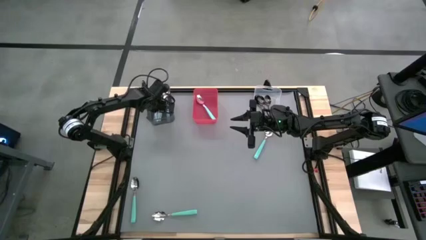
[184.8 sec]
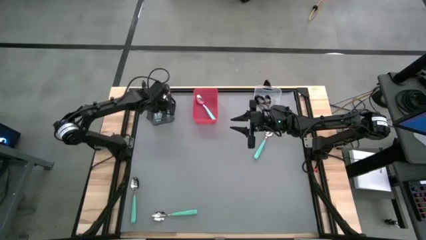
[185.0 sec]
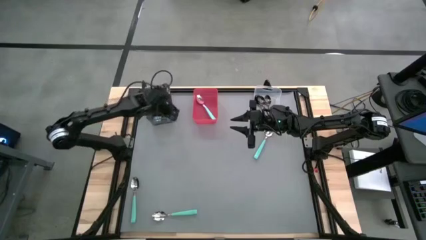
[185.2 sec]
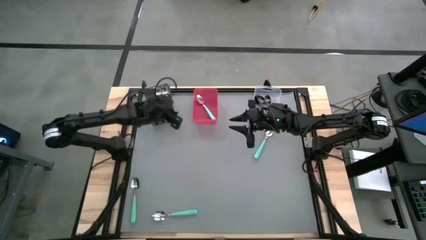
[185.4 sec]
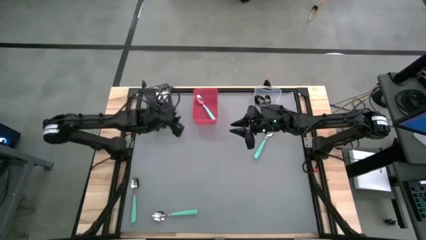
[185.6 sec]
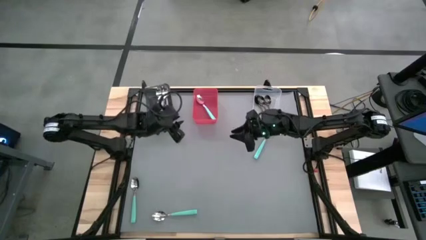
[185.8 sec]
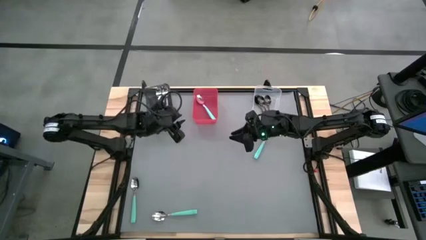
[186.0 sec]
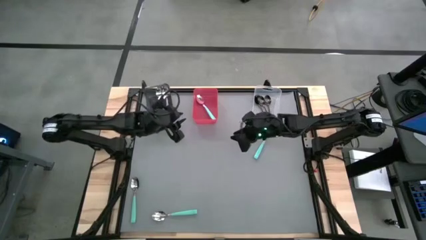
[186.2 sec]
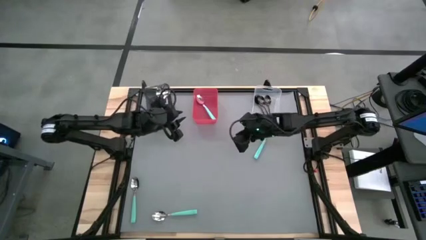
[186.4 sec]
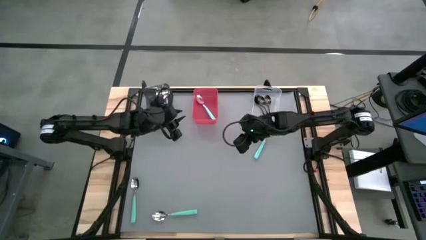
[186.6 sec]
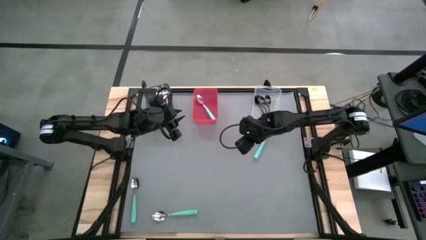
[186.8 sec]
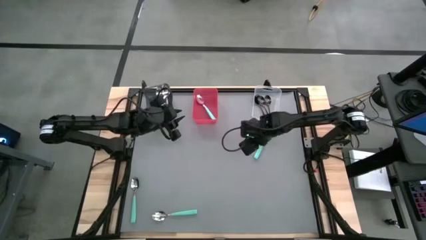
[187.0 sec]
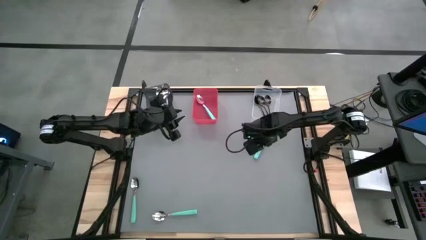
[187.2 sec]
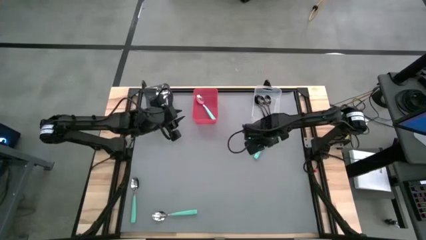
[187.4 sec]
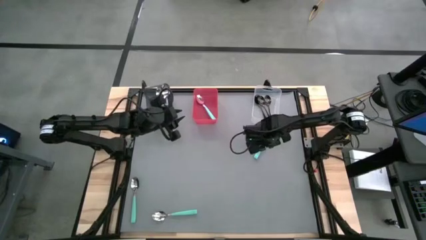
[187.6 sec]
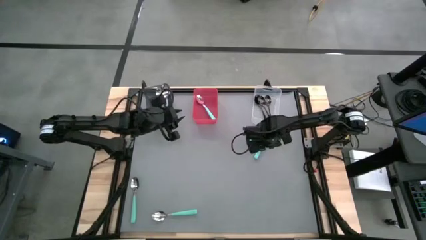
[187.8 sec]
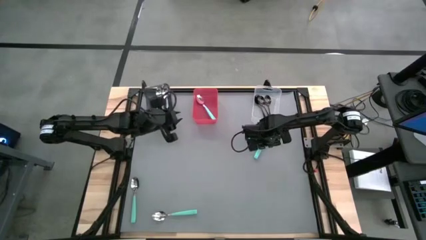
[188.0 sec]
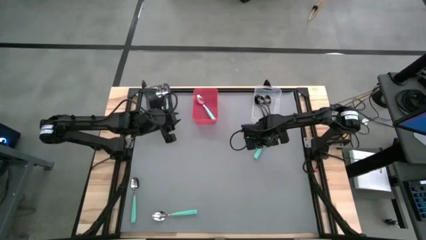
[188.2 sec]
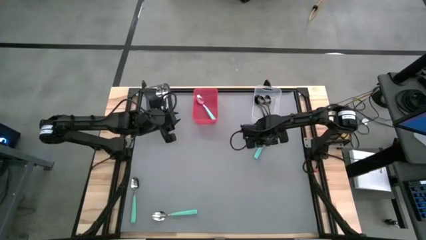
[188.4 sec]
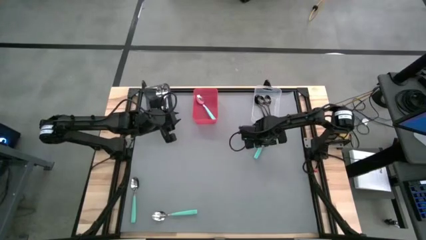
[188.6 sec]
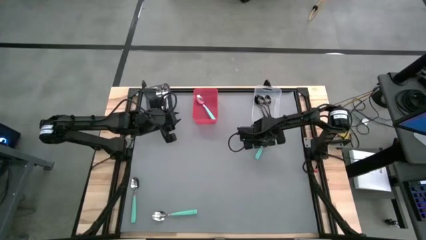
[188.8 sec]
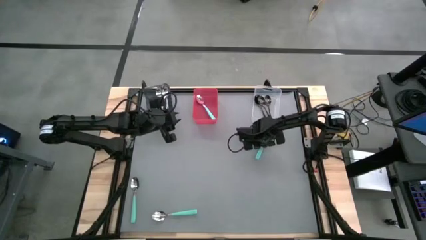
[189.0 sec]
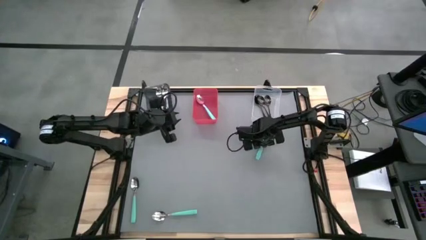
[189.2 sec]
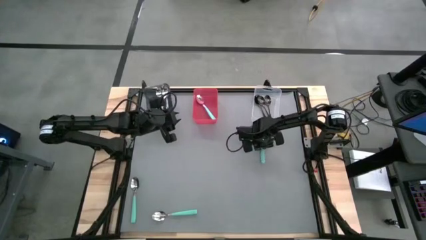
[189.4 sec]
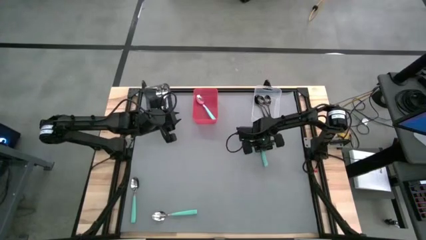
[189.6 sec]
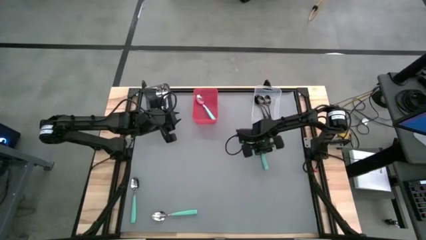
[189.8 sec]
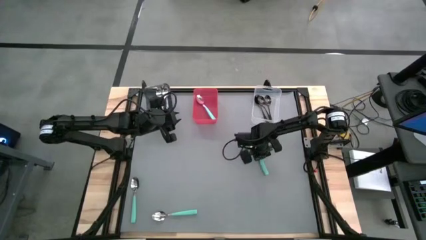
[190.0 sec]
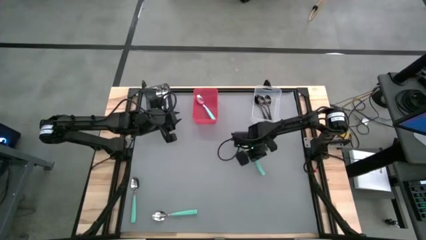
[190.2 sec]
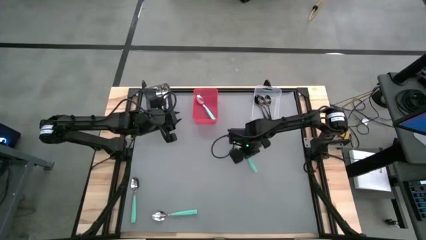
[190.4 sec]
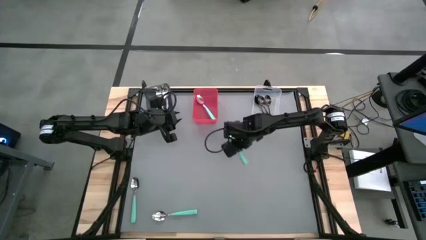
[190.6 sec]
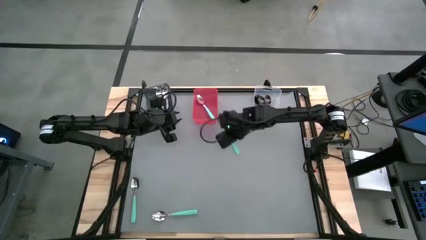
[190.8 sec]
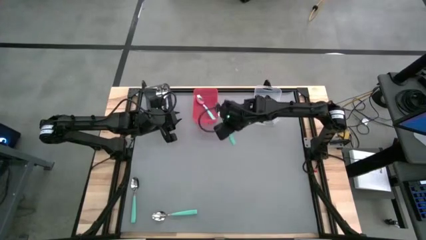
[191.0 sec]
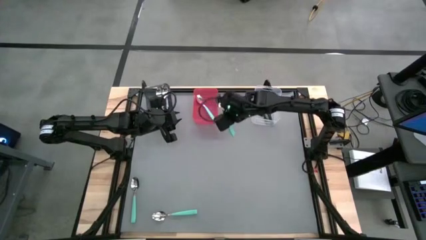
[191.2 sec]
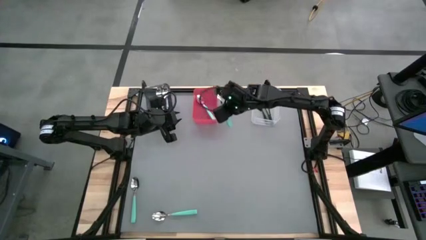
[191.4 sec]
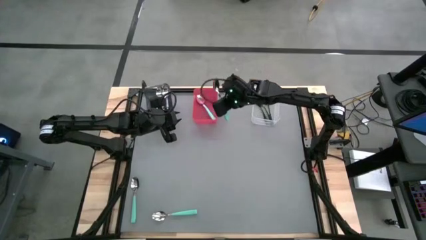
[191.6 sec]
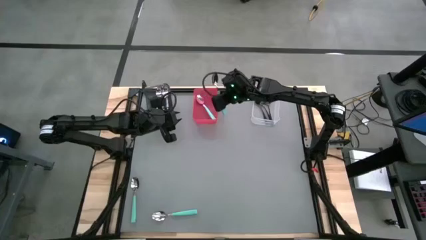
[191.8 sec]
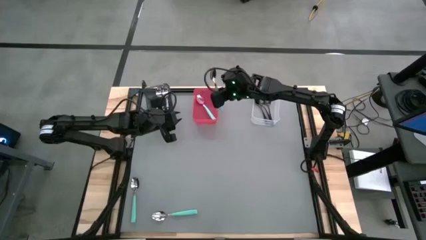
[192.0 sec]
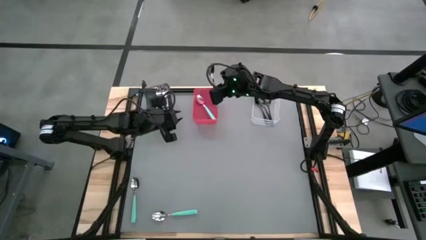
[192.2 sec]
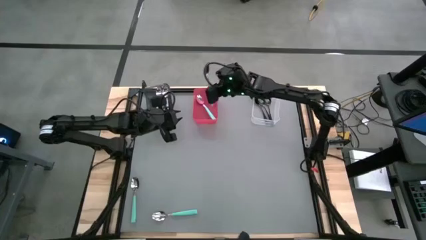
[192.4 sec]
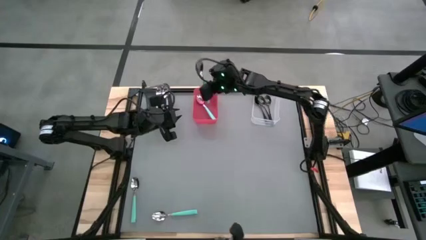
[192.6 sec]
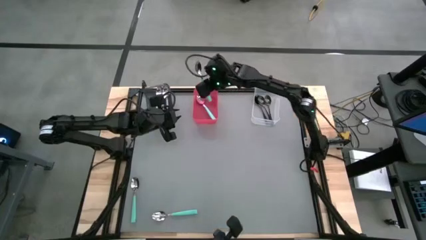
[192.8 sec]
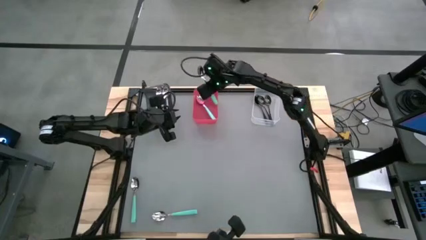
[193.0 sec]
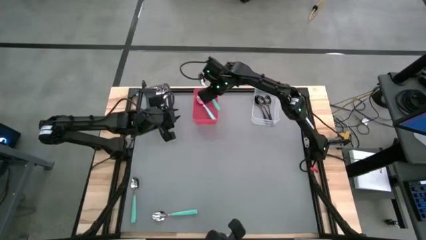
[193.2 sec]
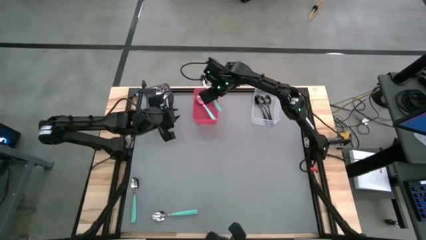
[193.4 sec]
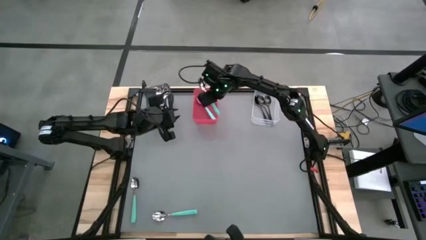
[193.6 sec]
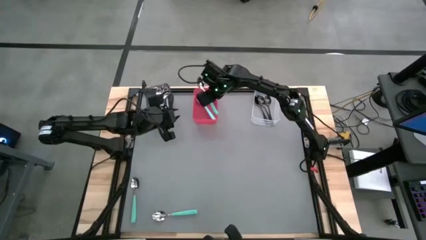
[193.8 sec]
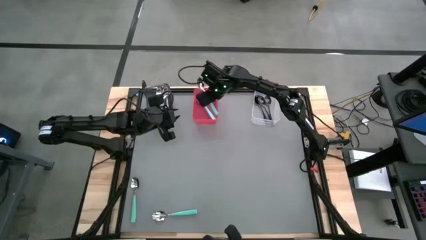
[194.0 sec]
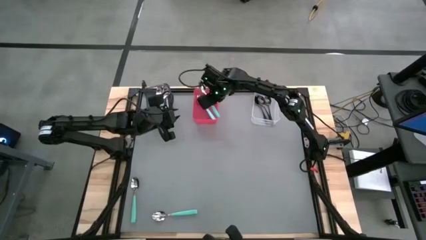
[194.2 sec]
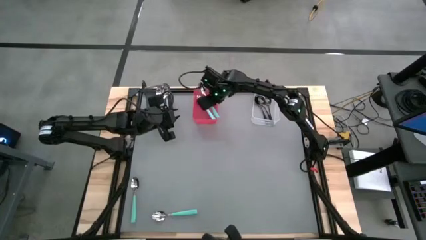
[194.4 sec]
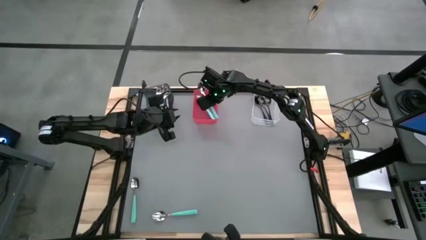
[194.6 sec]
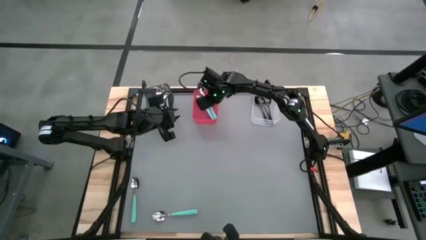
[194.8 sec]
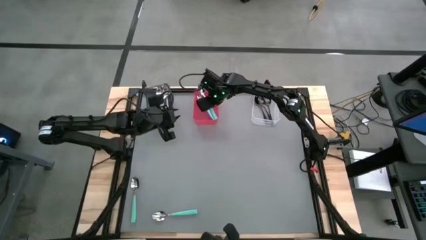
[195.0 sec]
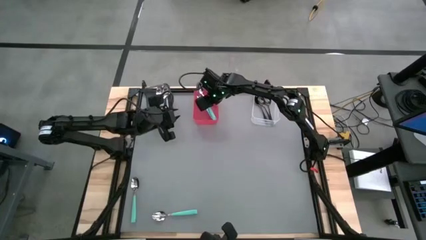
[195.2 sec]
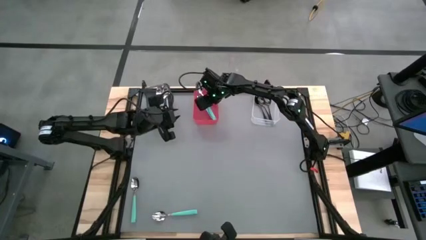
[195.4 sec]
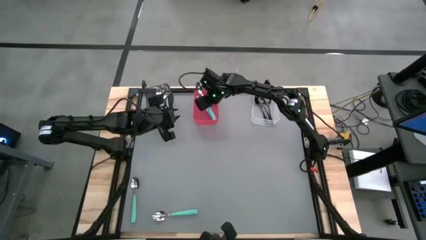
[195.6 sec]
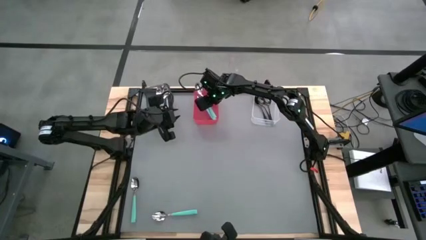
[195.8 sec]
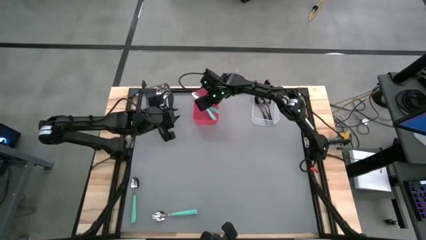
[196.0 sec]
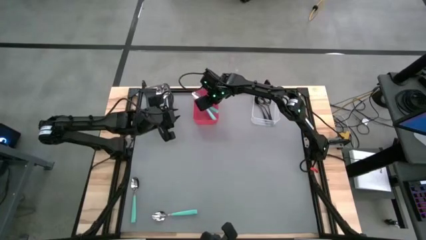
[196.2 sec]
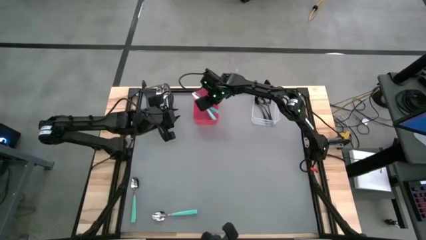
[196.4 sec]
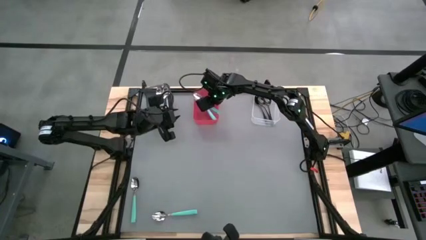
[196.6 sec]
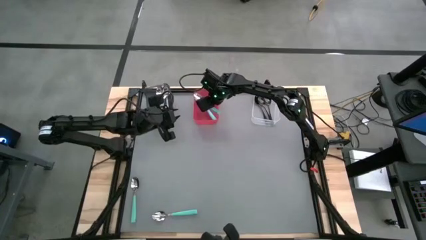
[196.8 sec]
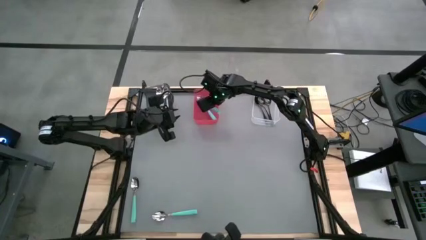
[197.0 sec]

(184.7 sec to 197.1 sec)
Task: Sort silverware by color (type)
Put the blue spoon into the red bin

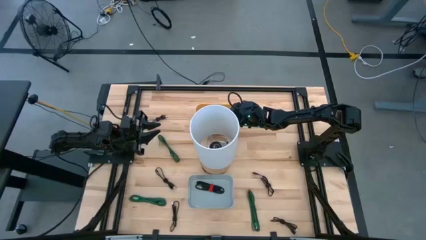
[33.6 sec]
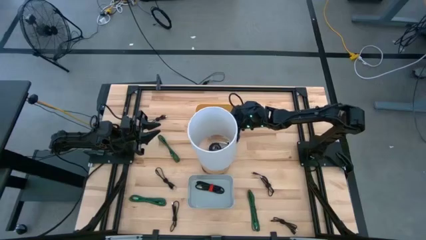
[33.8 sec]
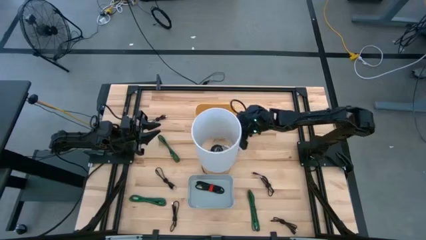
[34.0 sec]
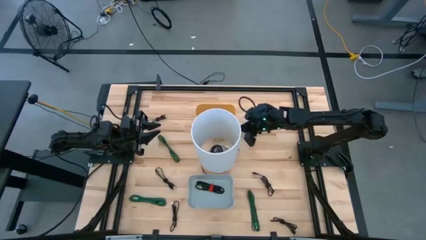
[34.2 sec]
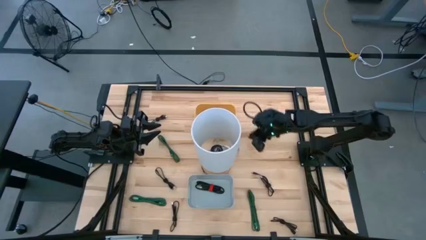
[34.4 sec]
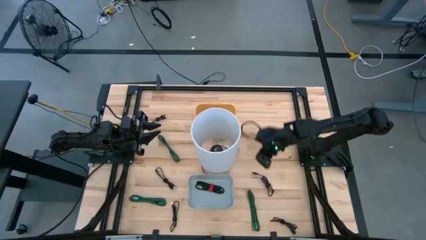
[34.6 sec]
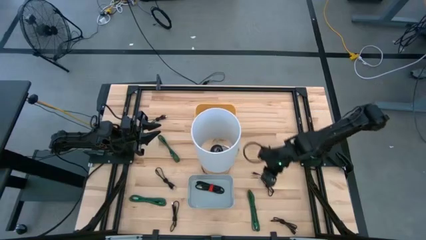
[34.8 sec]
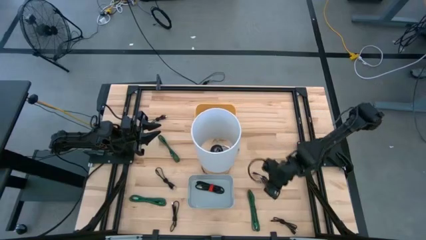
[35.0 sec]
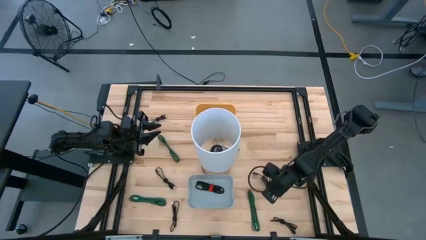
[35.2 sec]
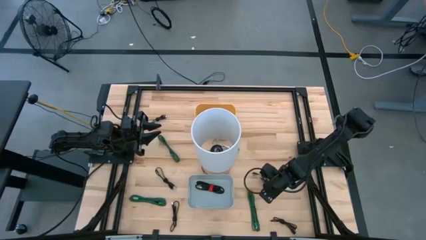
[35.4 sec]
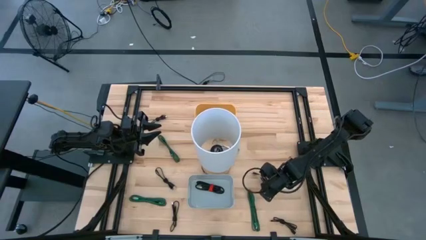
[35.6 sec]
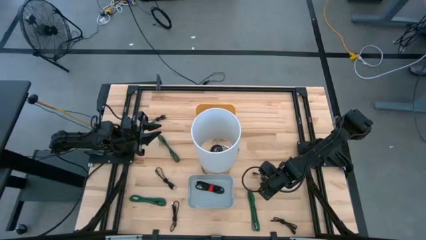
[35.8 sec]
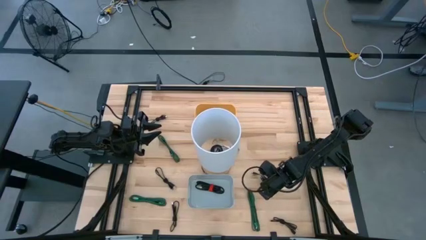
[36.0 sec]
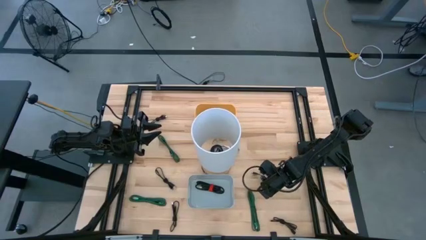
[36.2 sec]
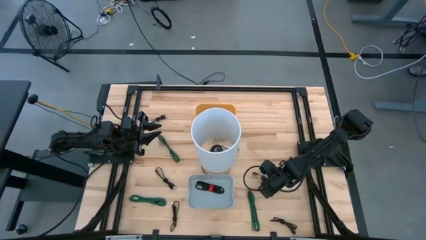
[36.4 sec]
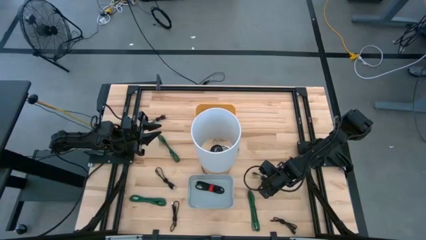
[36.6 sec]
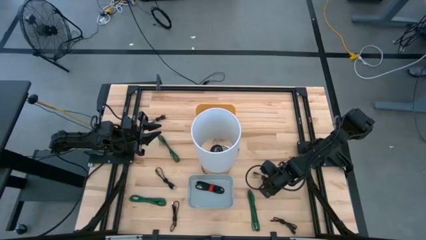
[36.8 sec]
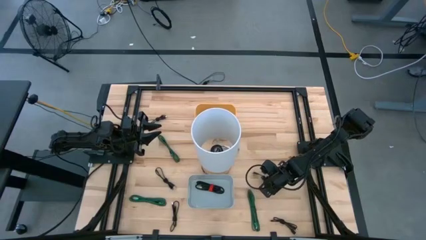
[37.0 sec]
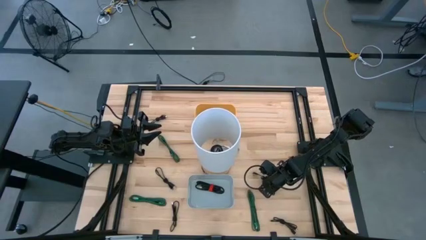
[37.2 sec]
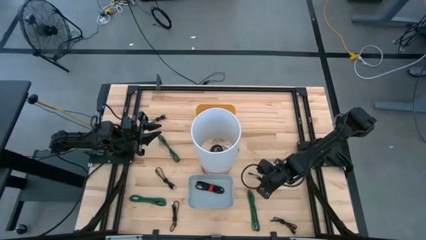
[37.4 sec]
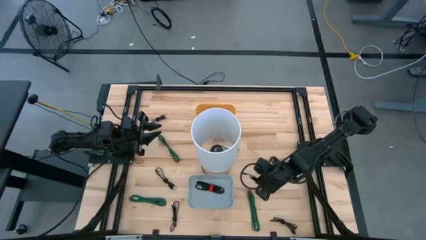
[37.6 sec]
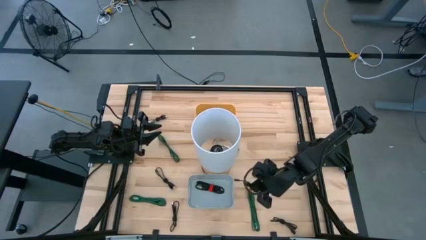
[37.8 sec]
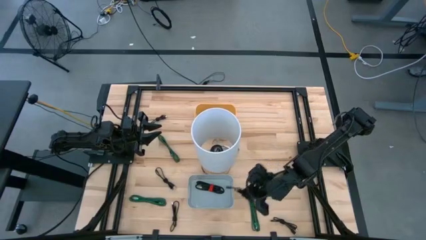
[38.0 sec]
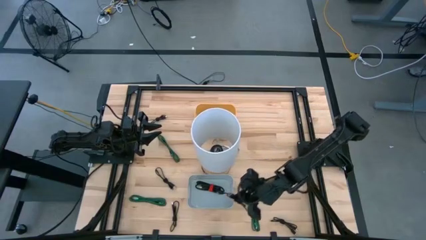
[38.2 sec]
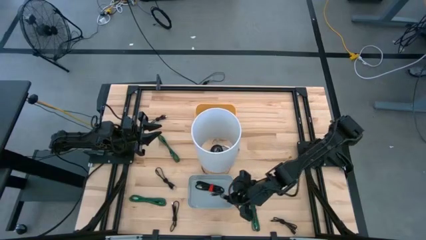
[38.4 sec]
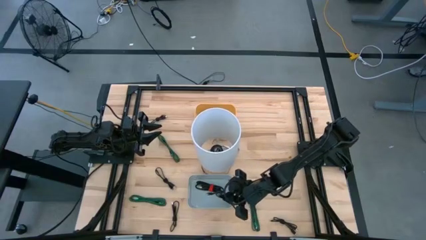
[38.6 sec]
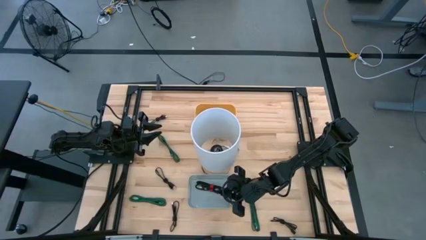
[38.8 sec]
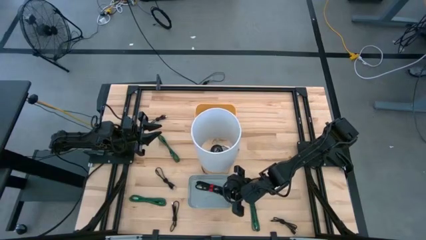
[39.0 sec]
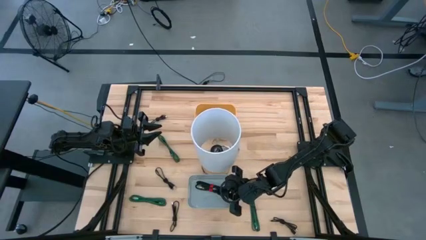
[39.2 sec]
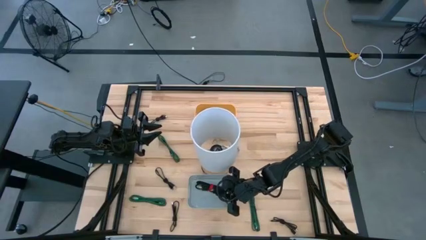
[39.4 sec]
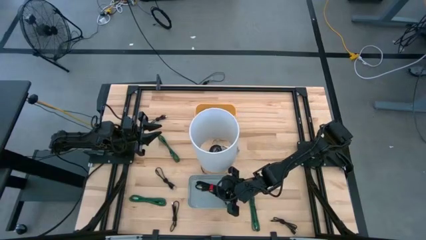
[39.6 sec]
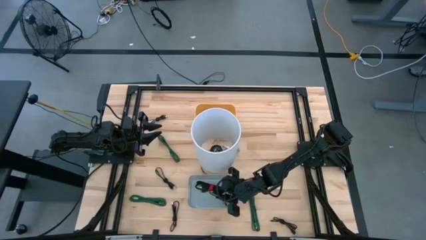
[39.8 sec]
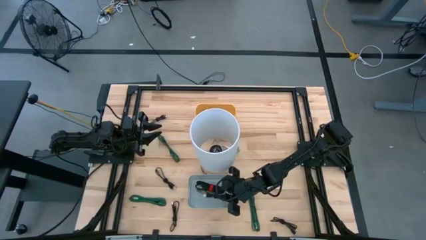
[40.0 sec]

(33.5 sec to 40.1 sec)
Task: Pick & Place USB Port
Put the black charger cable into the white bin
